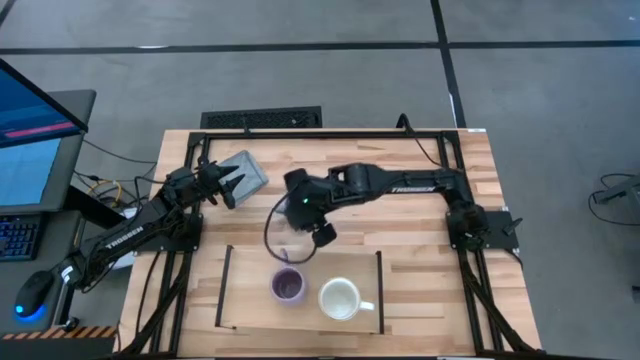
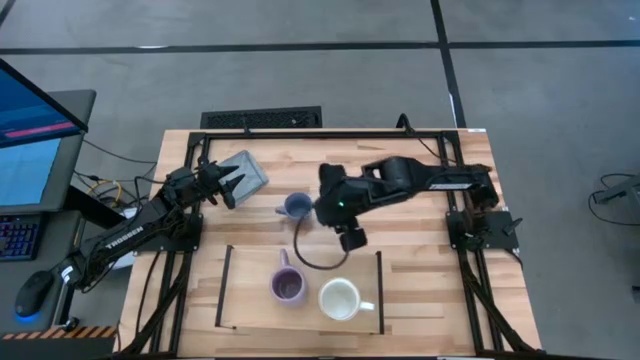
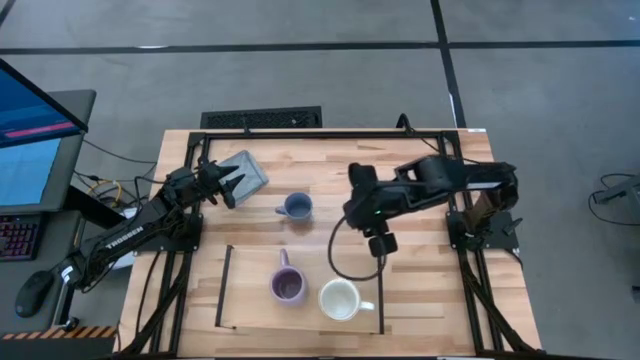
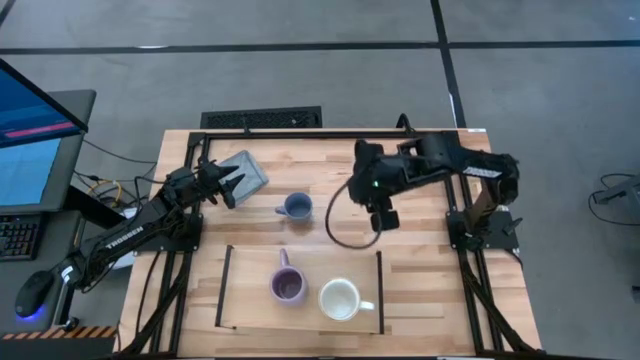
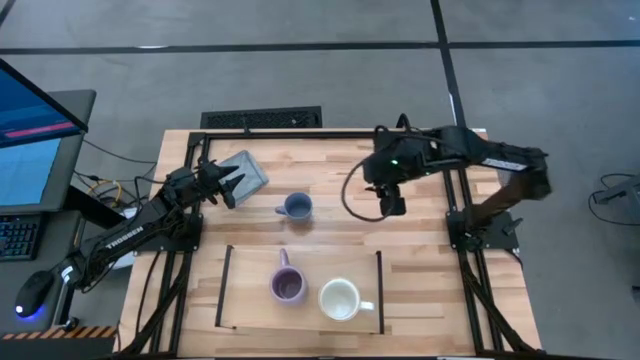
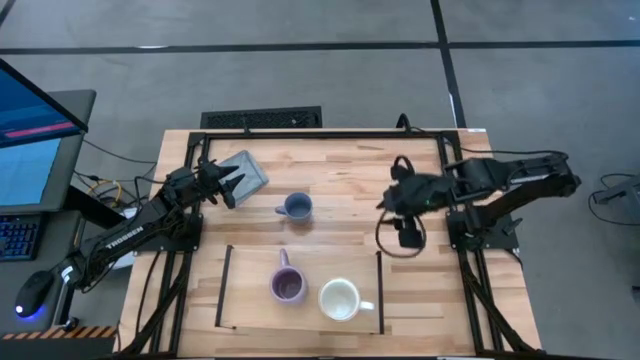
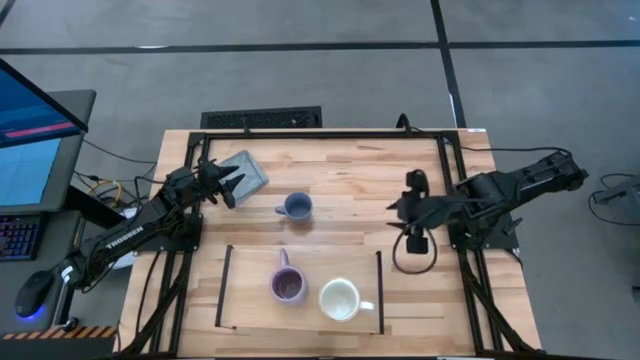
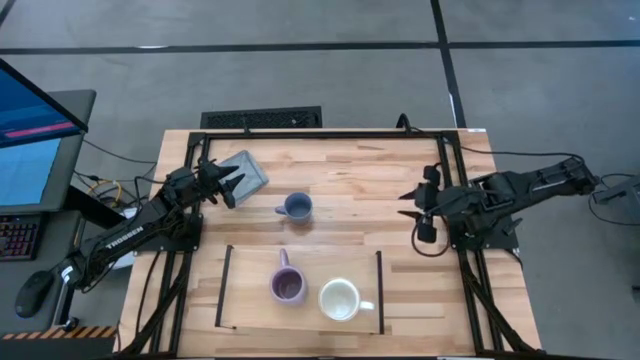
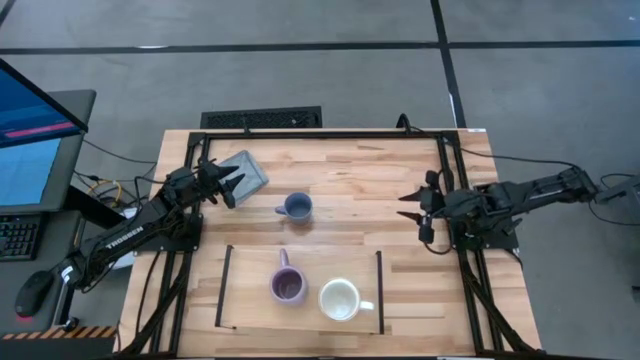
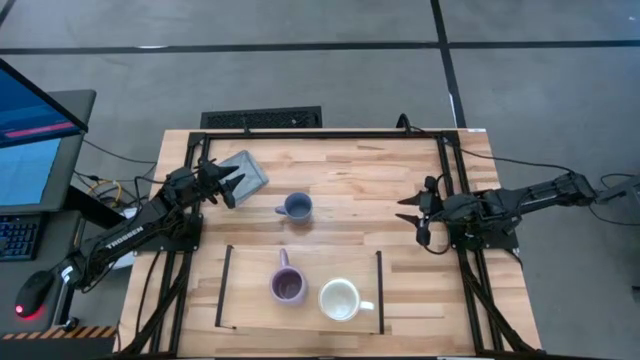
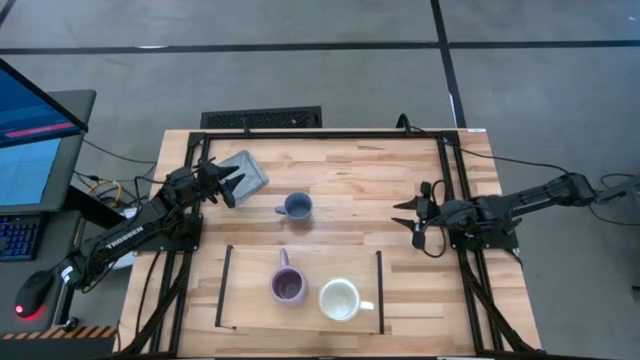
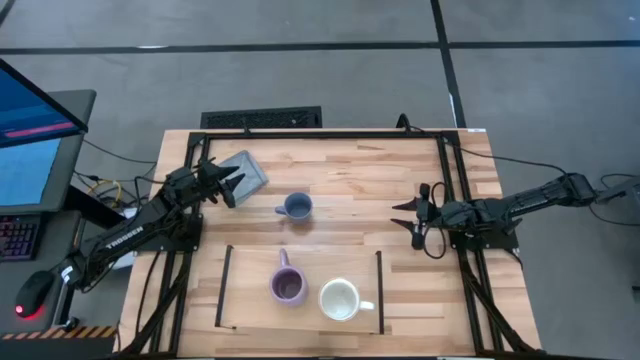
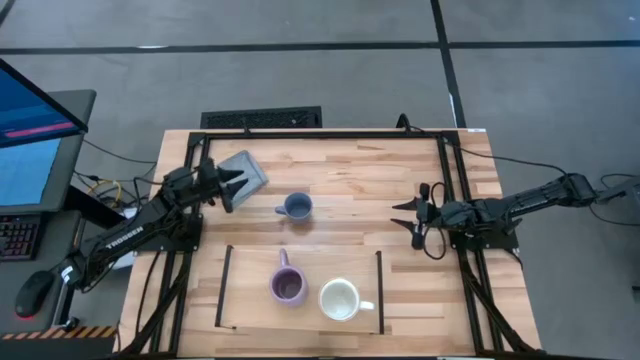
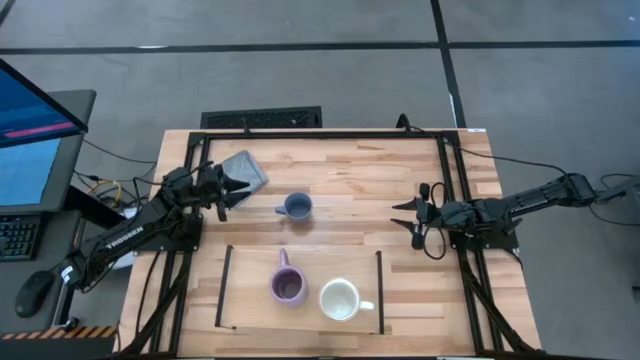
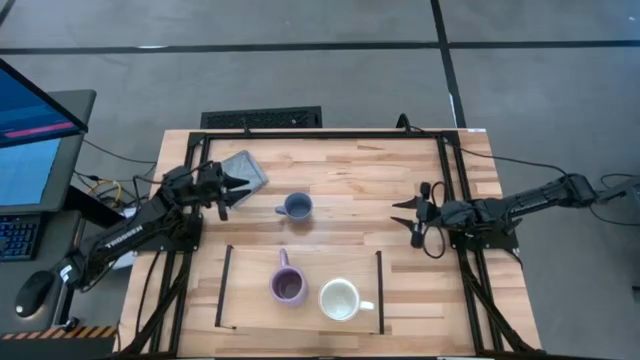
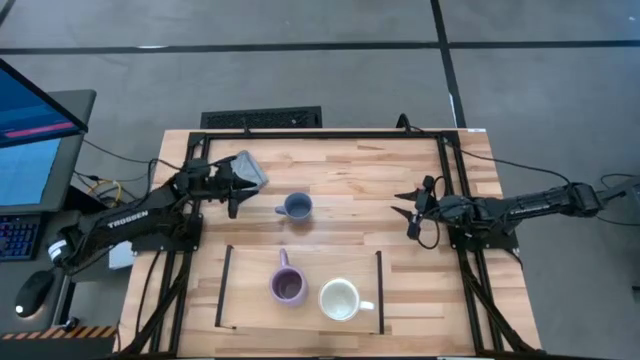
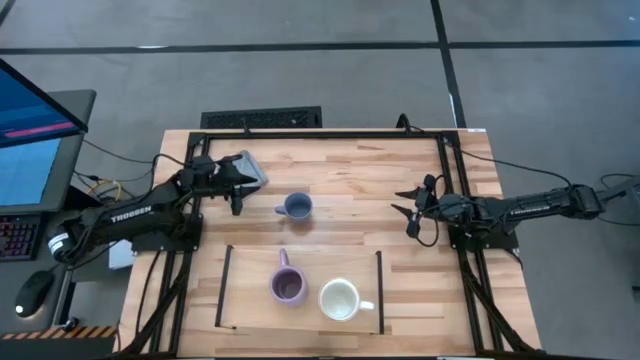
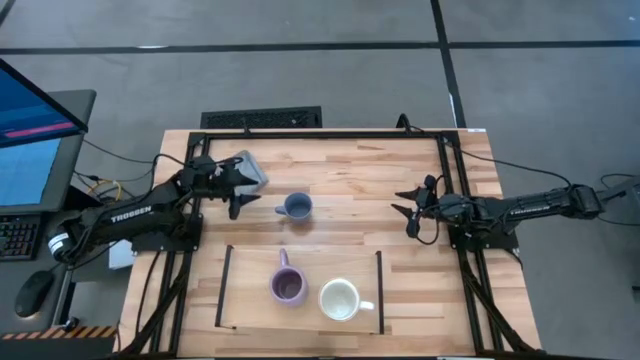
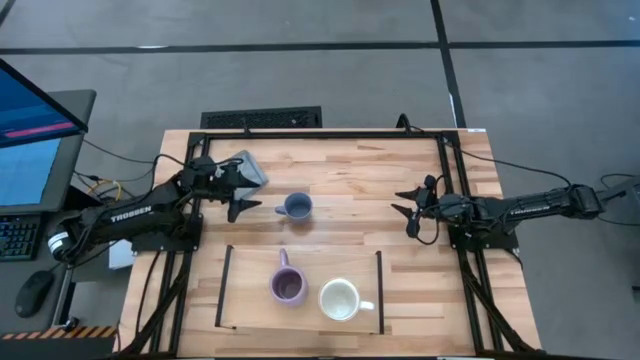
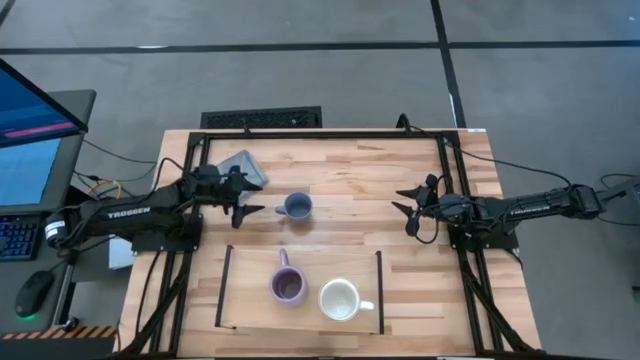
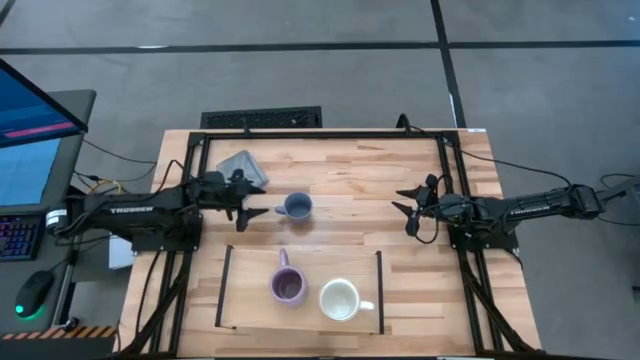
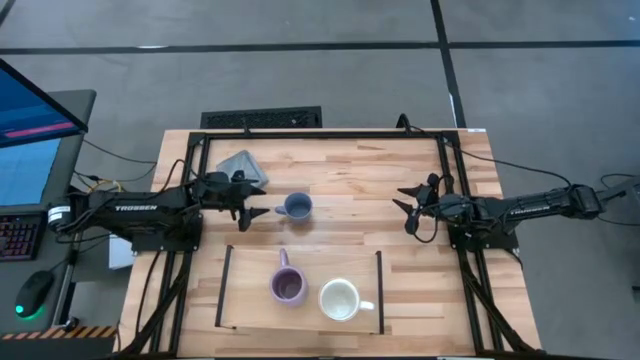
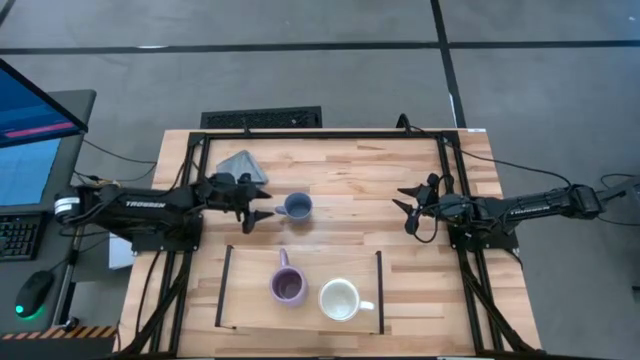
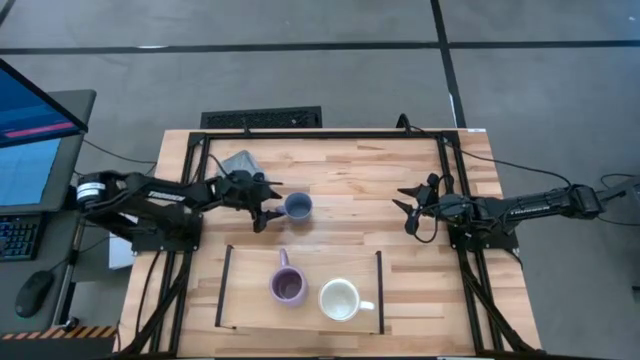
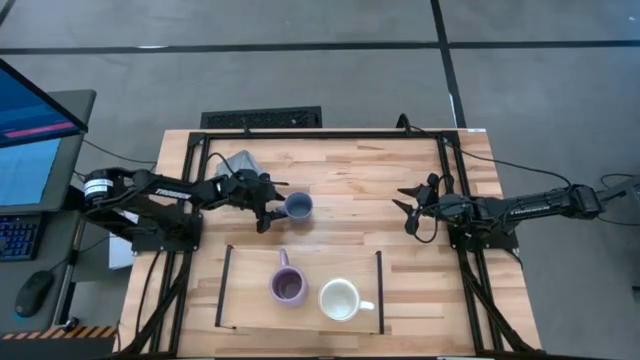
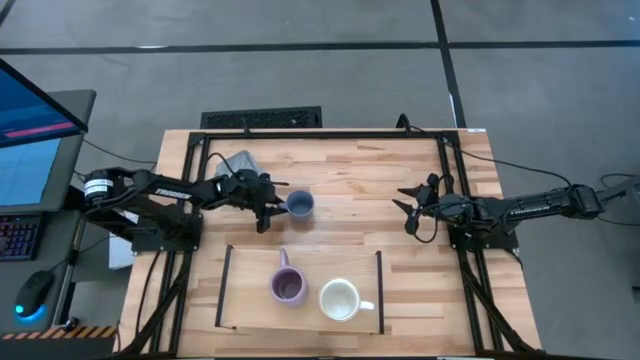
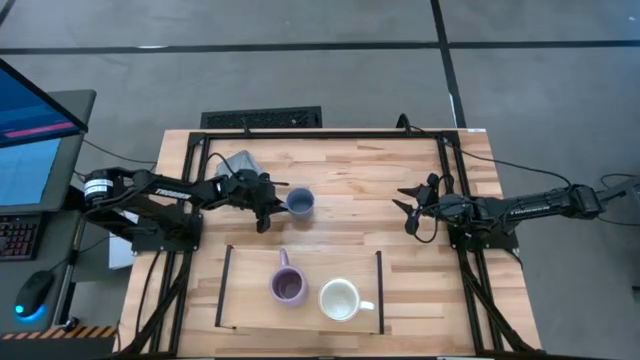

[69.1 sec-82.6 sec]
Task: Stack small to large cups/mugs on shelf
Put the blue mug on the shelf

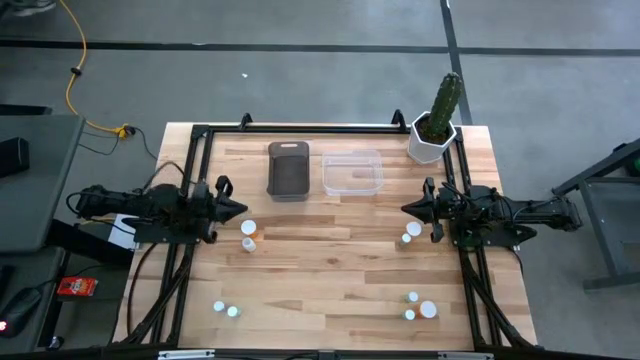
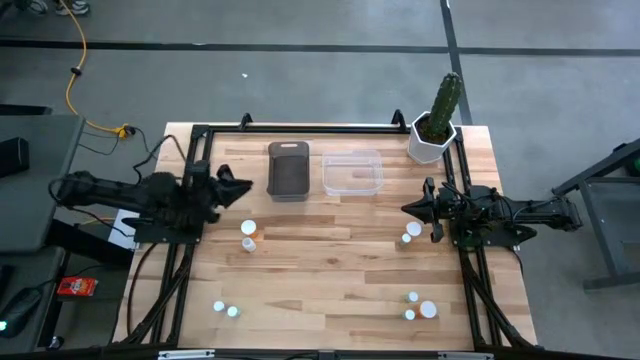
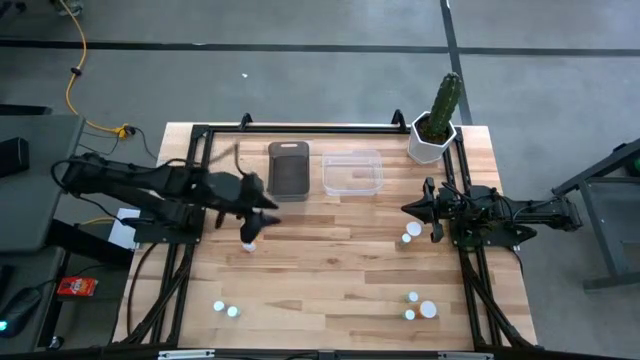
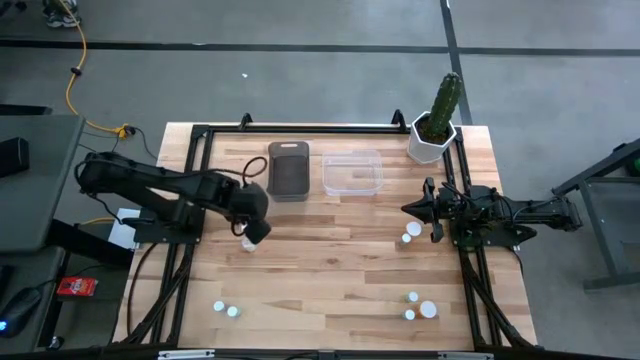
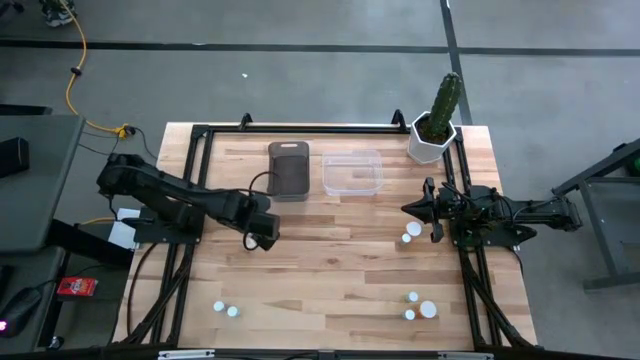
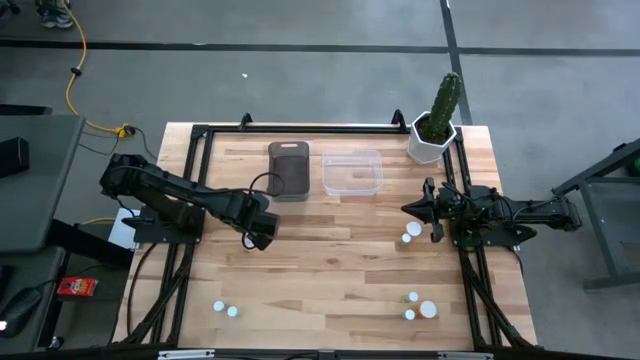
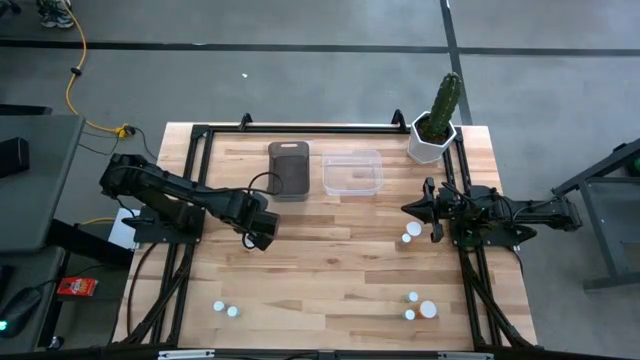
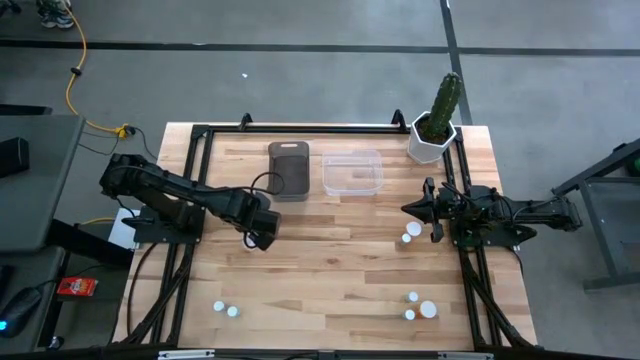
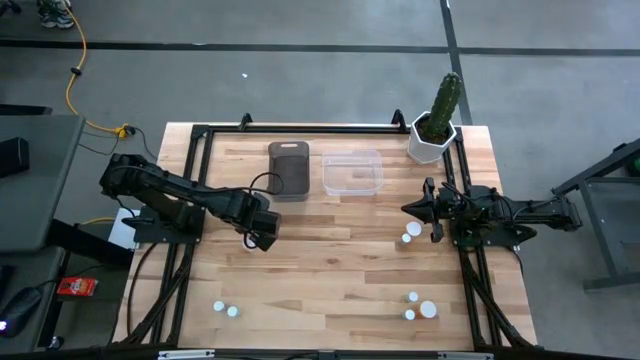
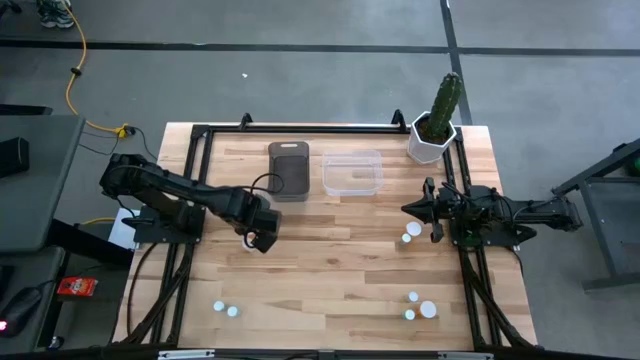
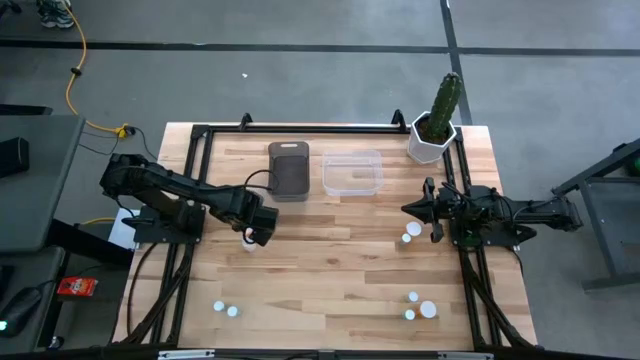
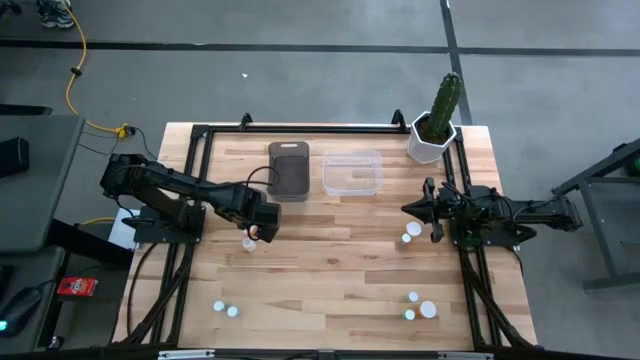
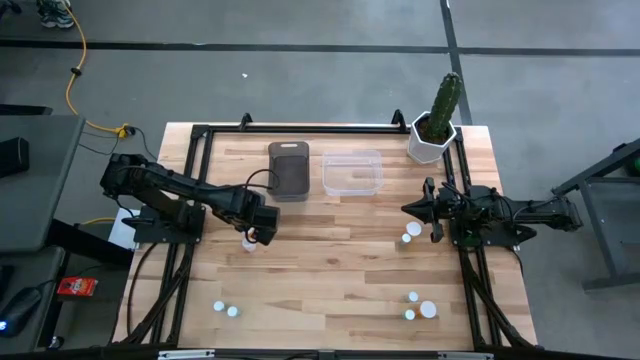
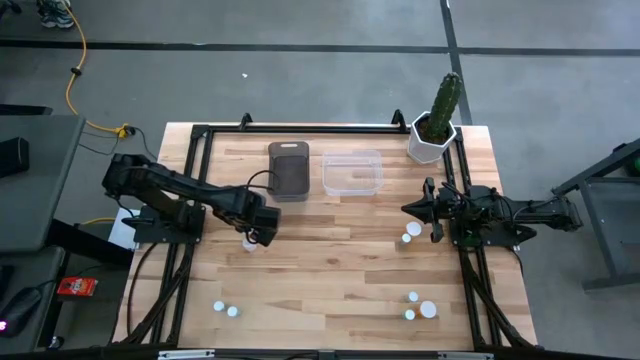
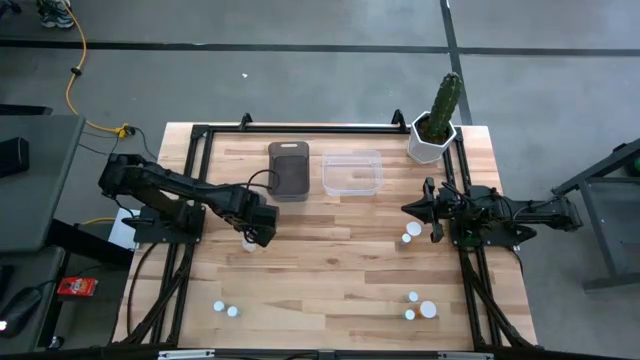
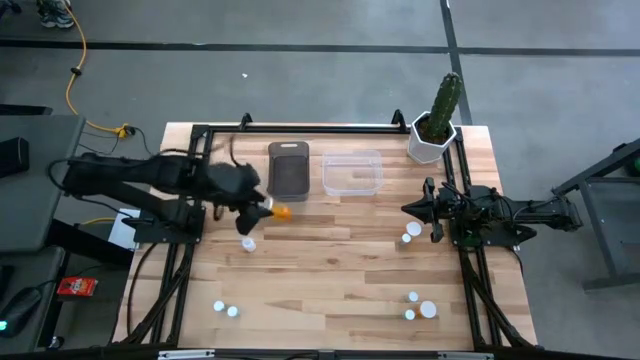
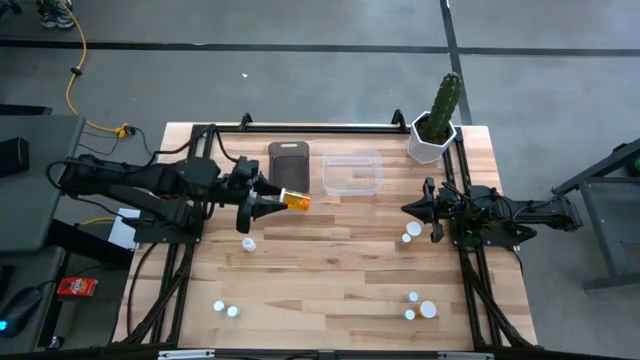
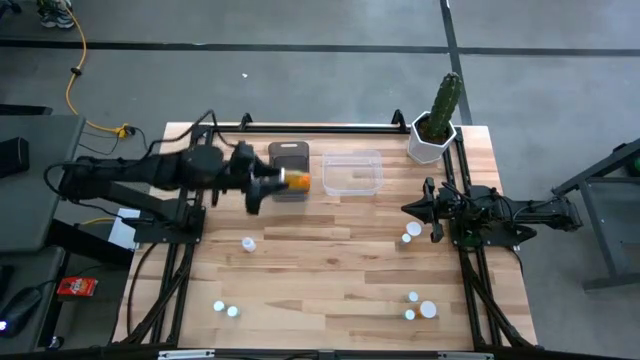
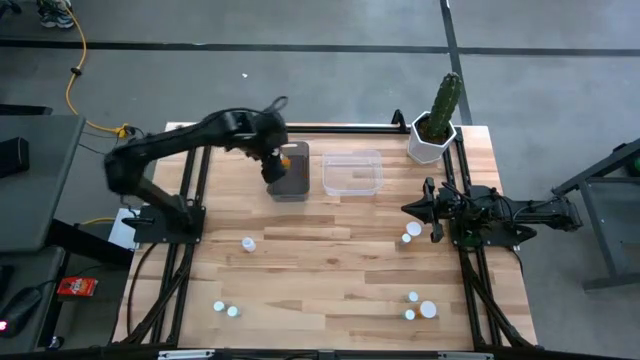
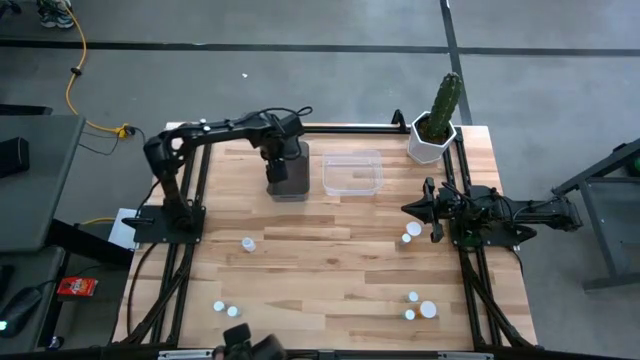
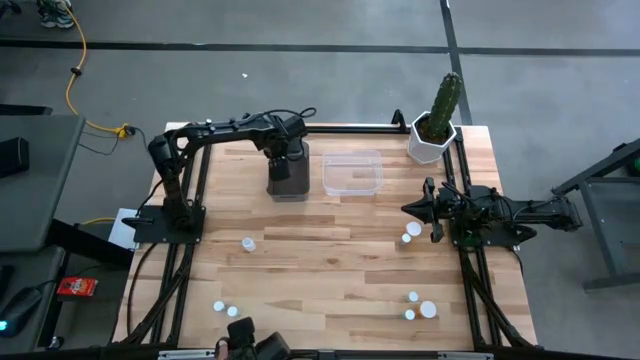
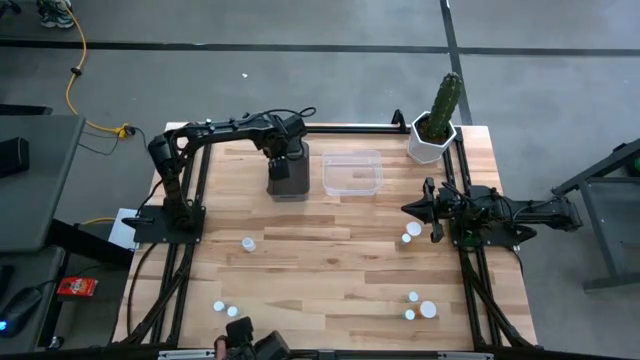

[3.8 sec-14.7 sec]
Task: Pick and place medicine bottles into bin by pill shape (circle, oval)
Put the top left orange capsule bottle into the black bin
